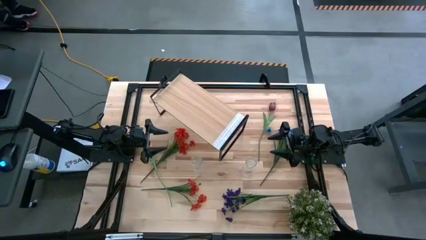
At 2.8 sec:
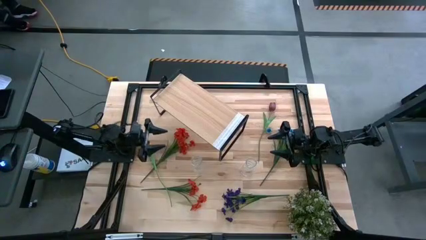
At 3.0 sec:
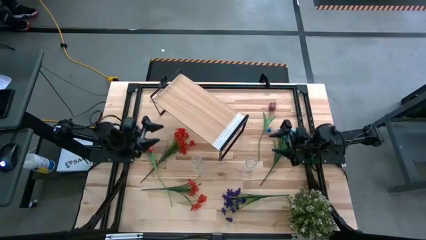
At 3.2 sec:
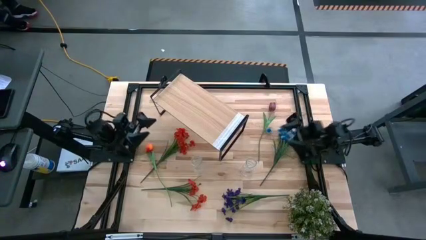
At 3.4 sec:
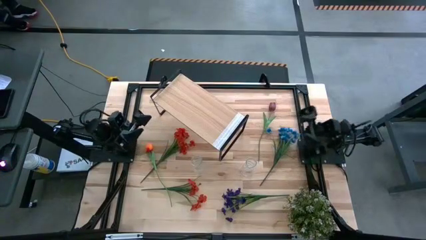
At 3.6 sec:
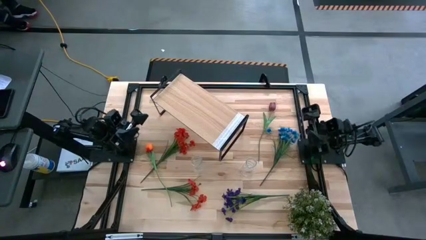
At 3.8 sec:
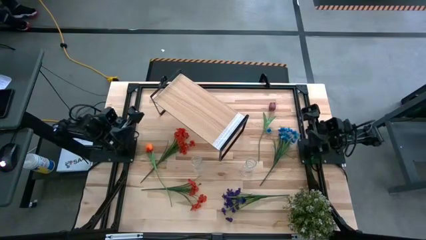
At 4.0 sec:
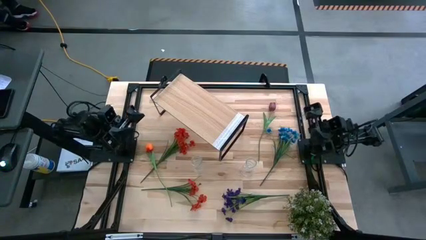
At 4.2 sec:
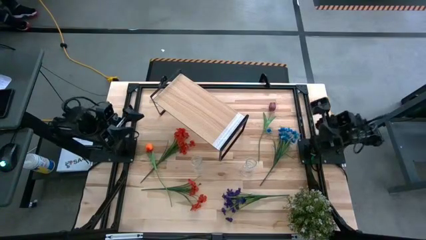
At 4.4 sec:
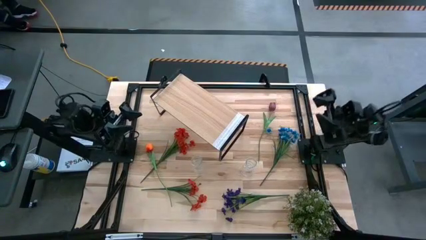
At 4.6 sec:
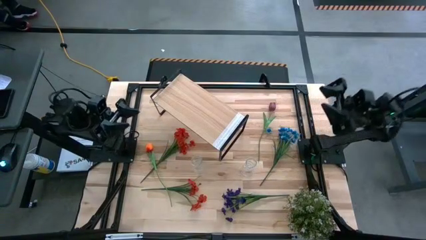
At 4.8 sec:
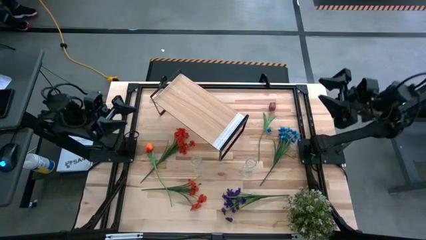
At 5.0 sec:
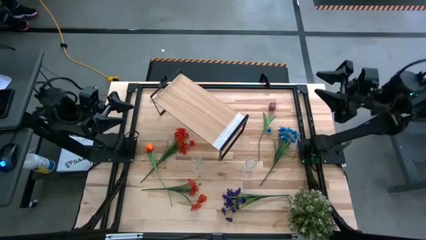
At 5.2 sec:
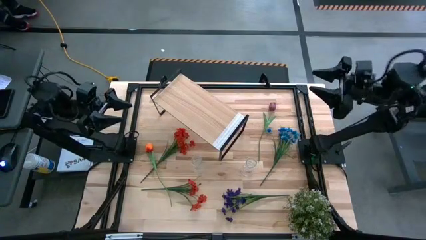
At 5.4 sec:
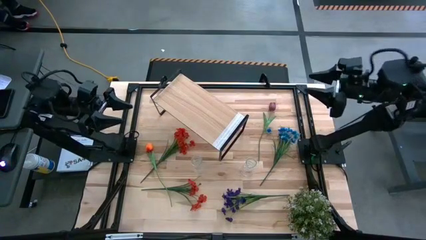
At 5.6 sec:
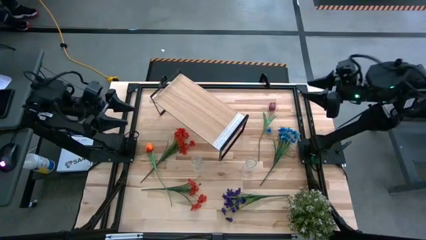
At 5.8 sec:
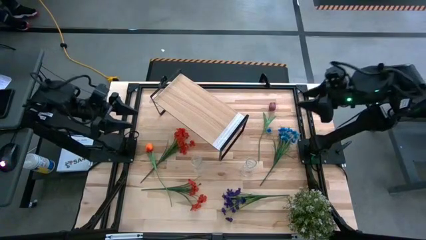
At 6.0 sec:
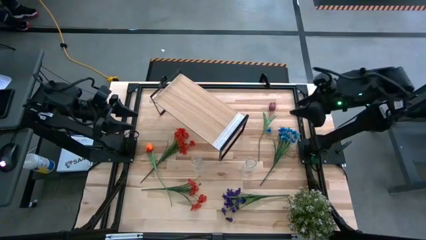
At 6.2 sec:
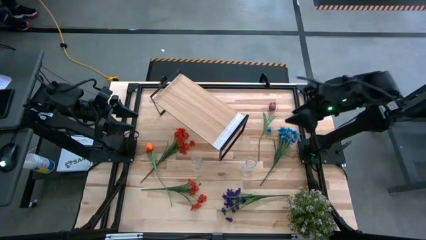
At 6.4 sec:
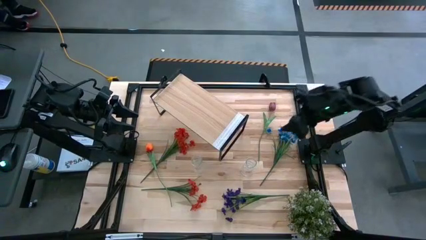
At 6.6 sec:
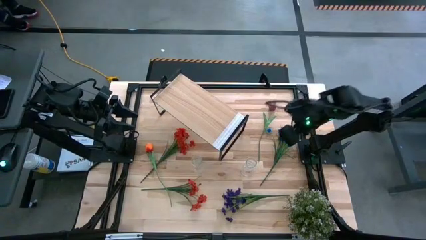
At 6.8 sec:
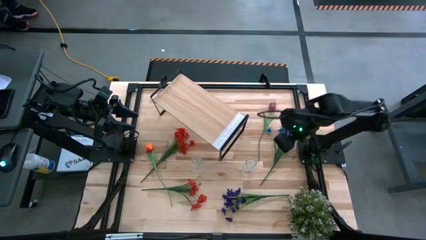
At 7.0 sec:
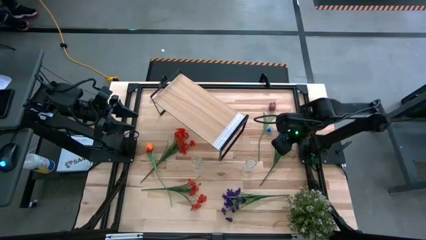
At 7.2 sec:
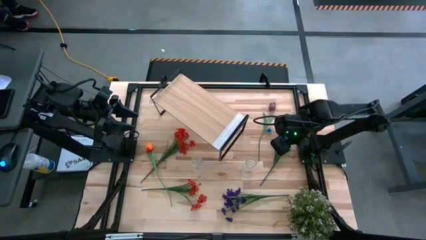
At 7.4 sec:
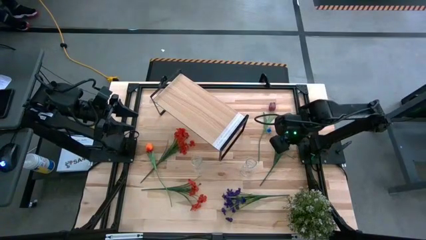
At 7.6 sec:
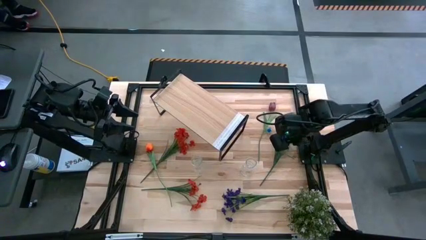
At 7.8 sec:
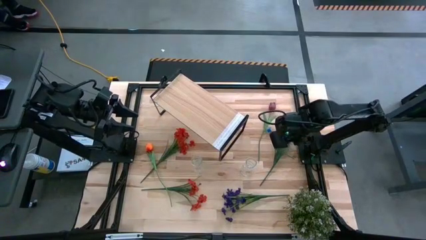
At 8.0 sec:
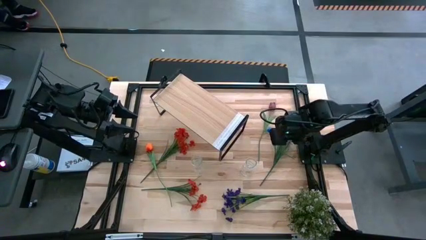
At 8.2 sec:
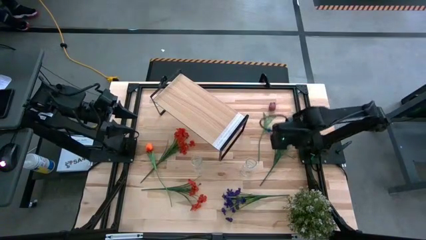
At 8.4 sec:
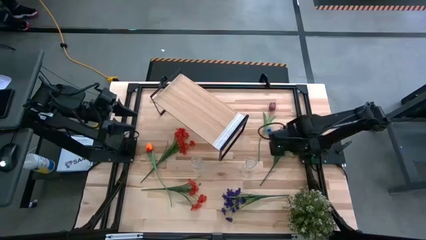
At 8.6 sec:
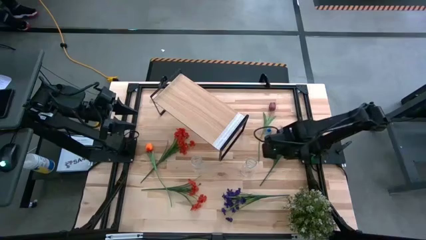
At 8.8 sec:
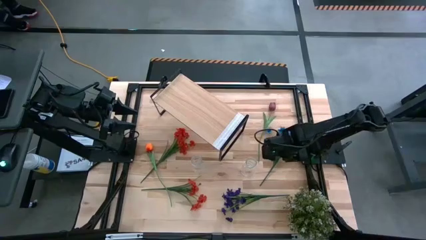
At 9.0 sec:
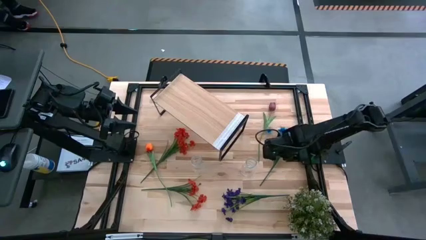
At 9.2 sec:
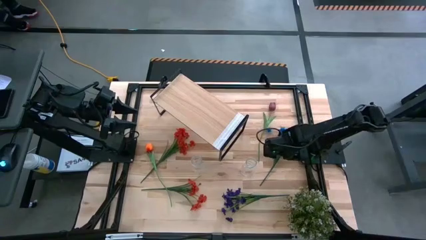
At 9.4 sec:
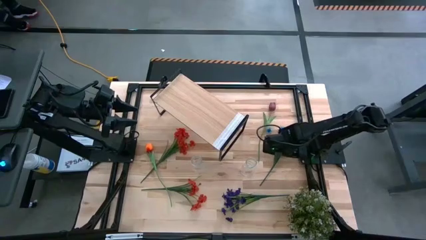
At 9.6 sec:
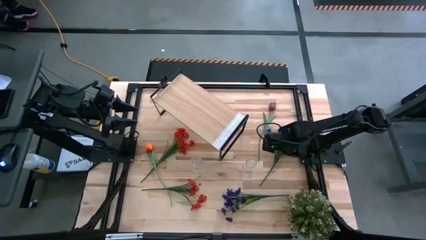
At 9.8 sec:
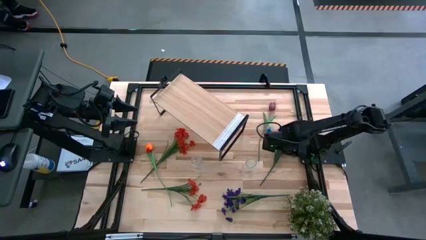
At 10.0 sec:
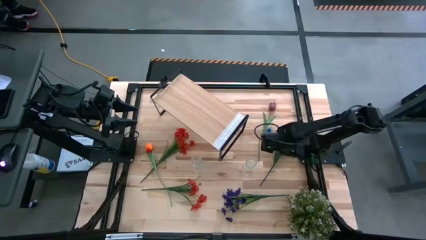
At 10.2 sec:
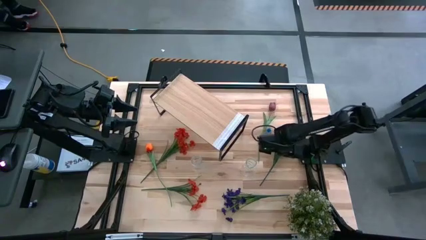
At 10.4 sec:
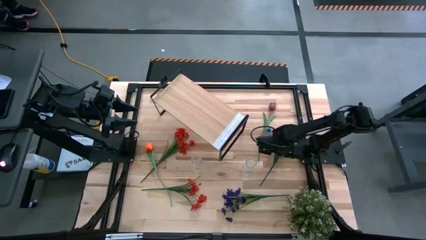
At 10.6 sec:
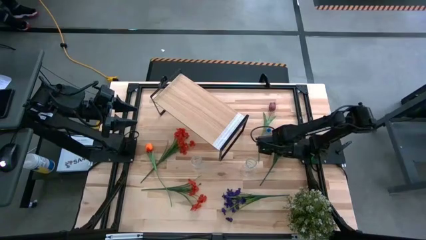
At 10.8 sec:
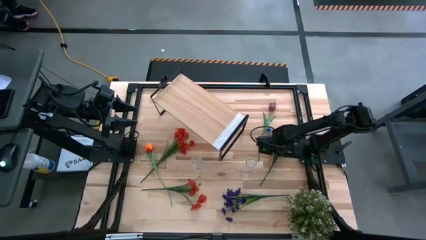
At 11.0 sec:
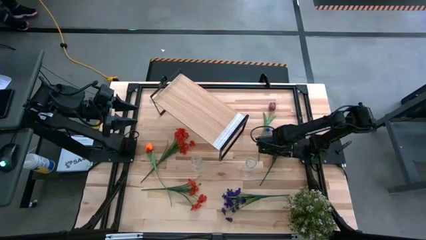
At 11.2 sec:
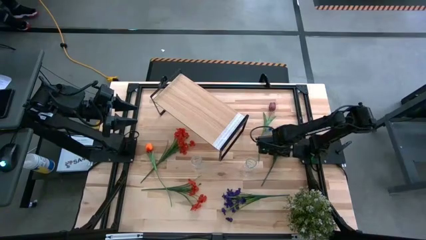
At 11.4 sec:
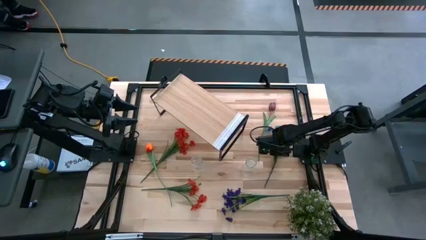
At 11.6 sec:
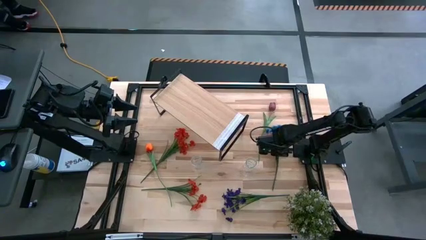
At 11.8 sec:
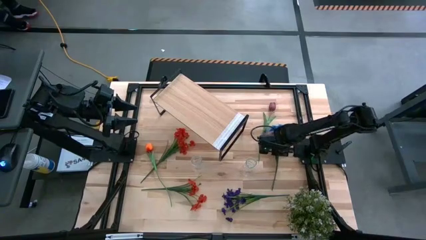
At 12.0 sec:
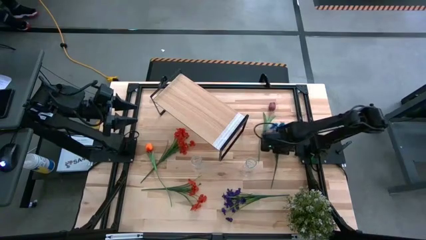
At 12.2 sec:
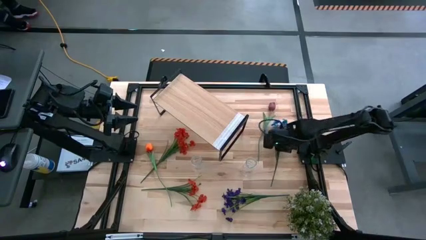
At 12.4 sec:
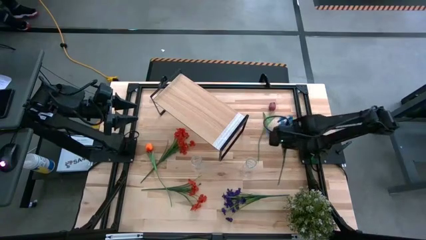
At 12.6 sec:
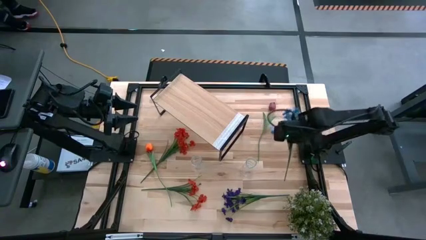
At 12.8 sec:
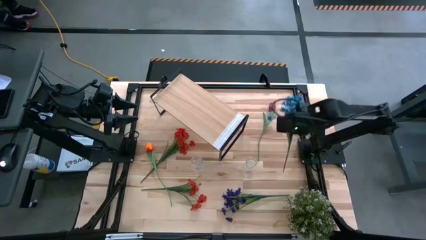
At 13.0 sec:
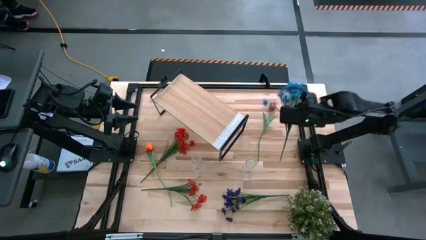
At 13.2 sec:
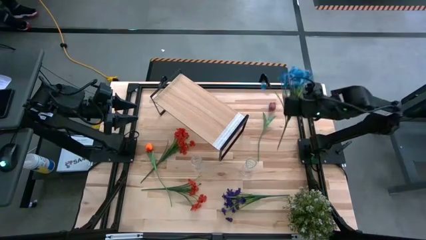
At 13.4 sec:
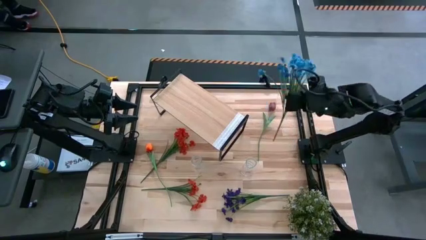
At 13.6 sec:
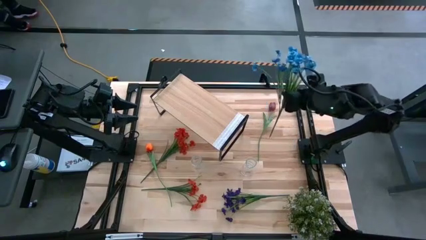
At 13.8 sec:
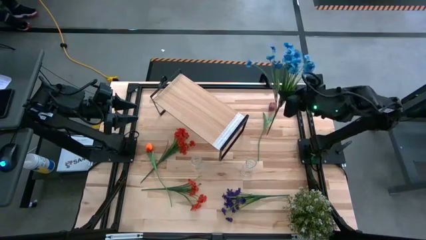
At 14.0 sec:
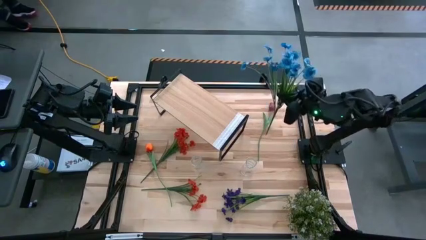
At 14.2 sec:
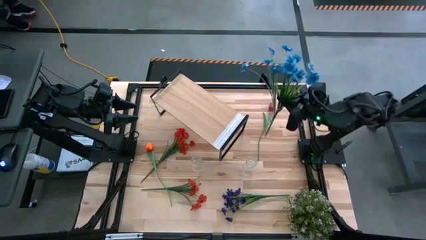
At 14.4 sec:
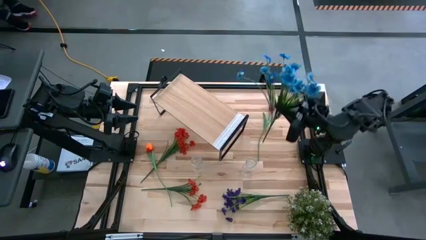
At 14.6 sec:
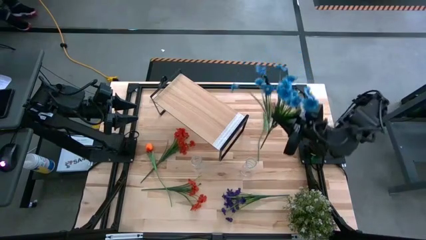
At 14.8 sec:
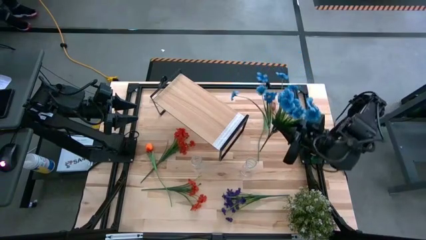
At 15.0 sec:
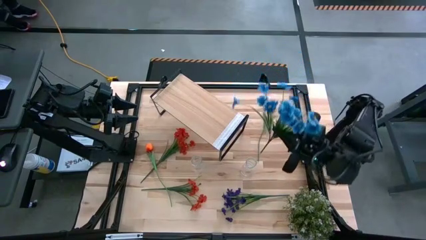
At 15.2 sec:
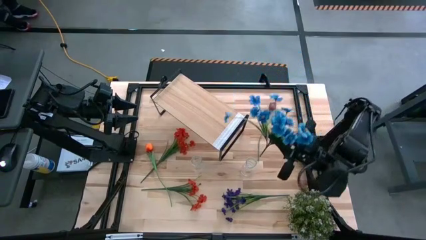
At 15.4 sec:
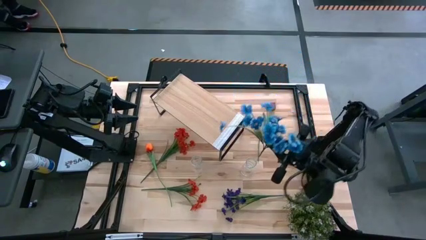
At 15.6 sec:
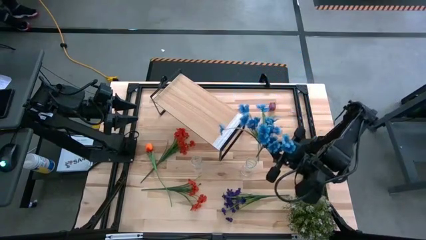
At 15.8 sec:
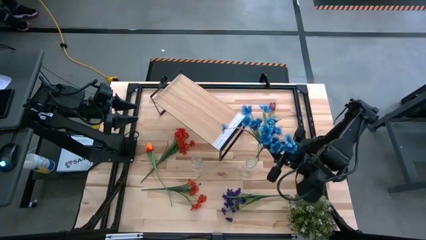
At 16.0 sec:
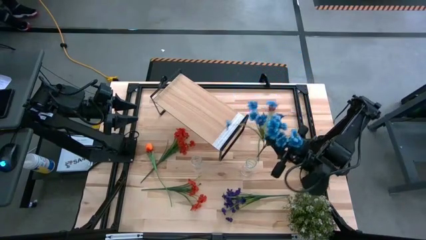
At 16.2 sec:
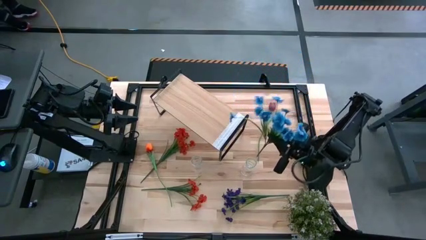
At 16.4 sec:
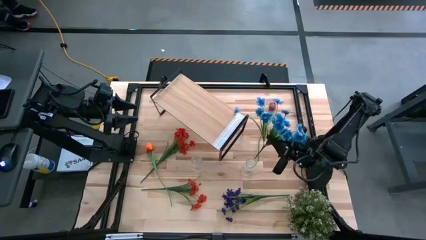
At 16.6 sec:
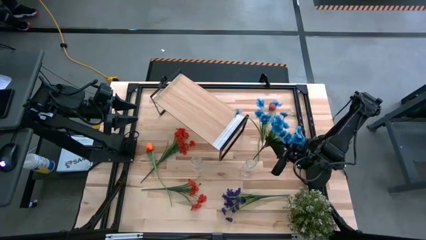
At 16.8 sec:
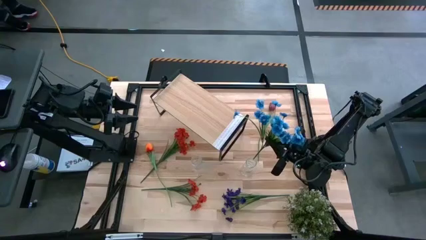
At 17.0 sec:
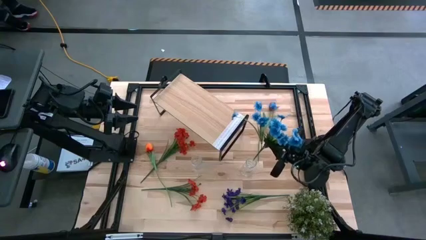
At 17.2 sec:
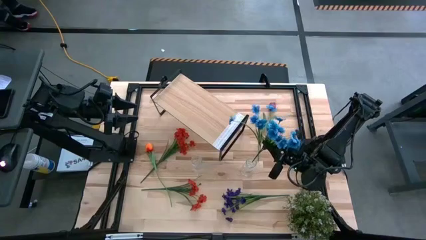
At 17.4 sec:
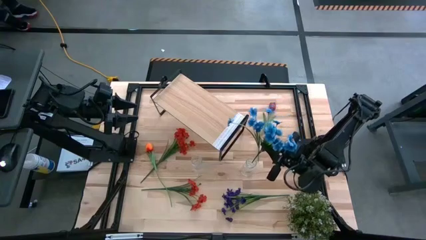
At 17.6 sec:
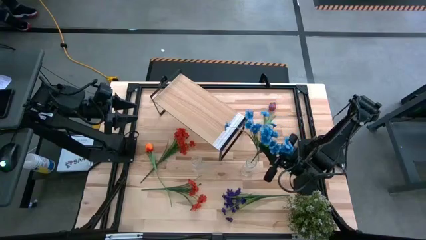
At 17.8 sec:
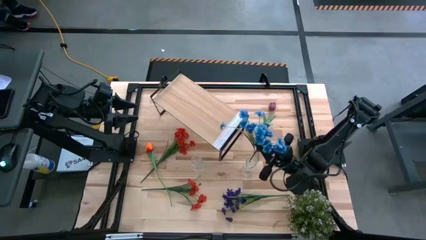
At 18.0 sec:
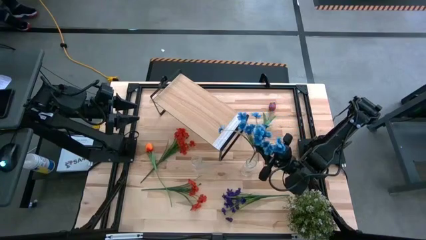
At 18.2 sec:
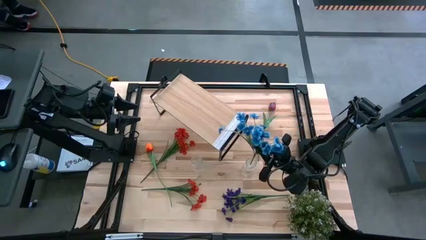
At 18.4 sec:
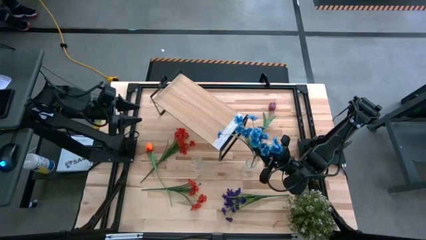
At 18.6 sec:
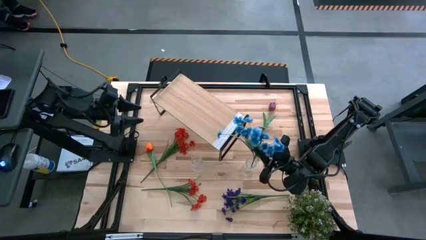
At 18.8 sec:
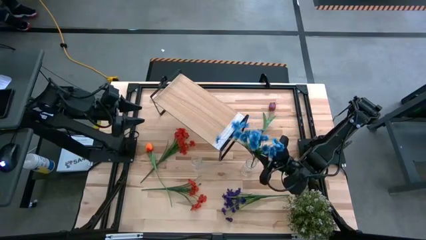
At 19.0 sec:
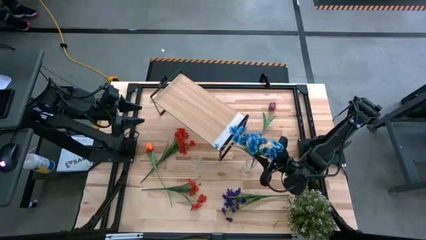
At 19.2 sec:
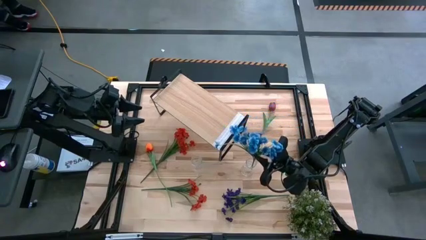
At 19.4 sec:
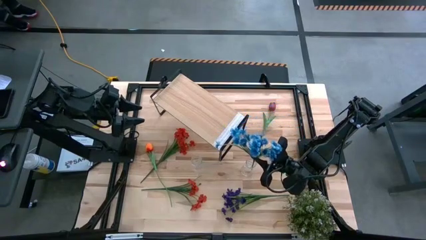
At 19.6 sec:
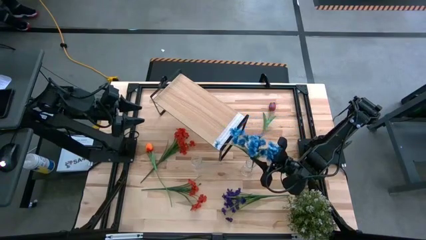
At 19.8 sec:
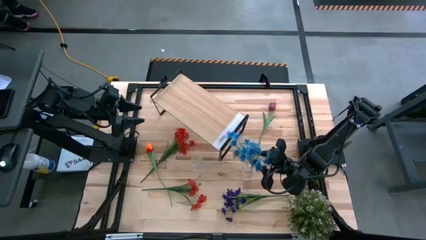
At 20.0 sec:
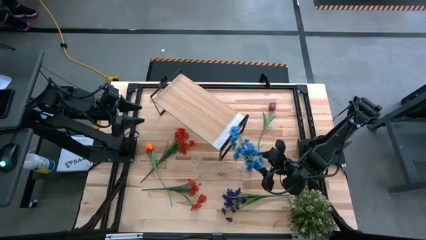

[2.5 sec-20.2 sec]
Task: Pick and place flowers into a vace then onto a shelf
Put the blue flowers into the right transparent vase
